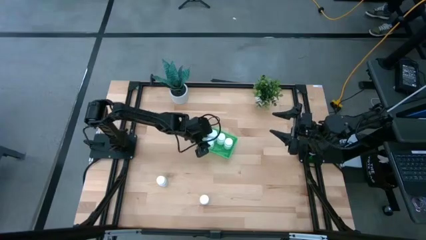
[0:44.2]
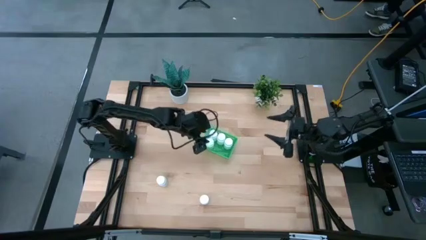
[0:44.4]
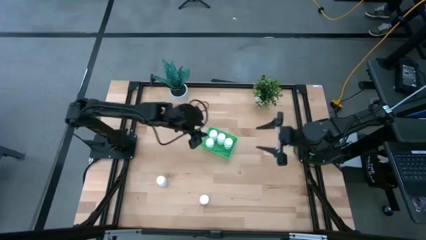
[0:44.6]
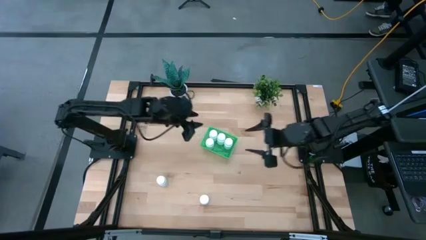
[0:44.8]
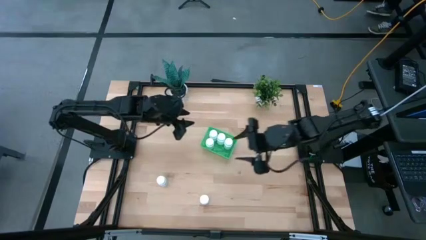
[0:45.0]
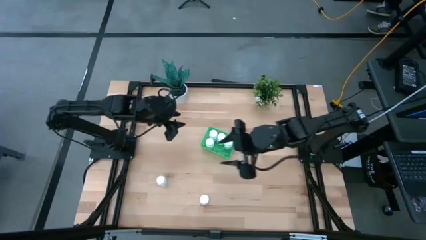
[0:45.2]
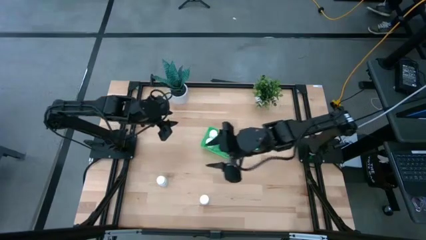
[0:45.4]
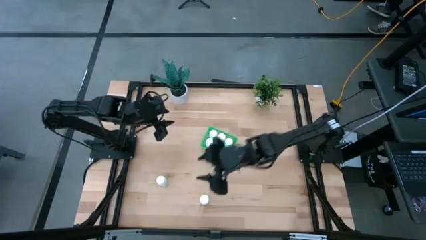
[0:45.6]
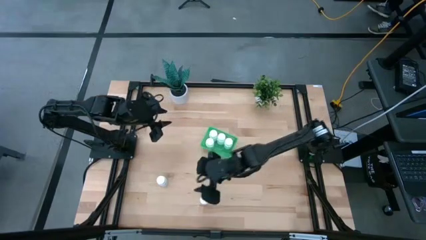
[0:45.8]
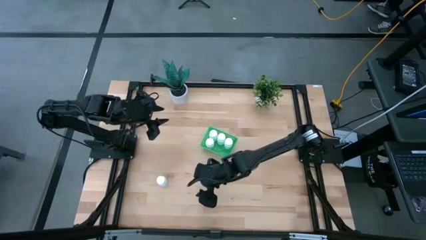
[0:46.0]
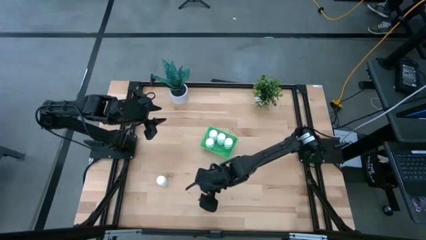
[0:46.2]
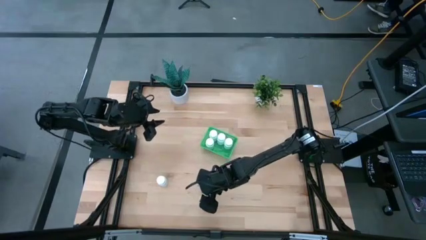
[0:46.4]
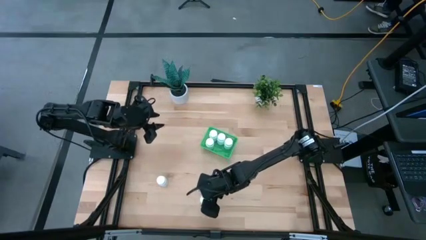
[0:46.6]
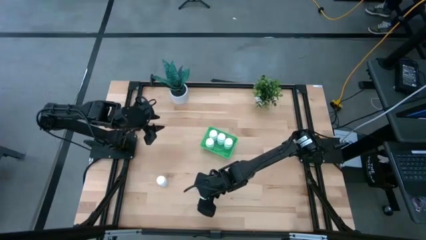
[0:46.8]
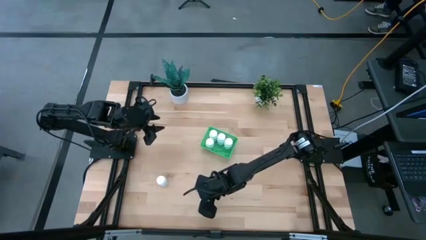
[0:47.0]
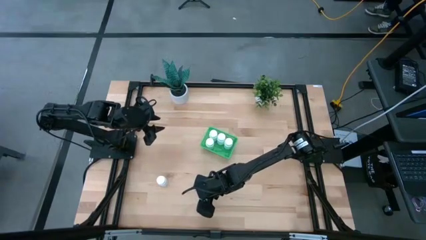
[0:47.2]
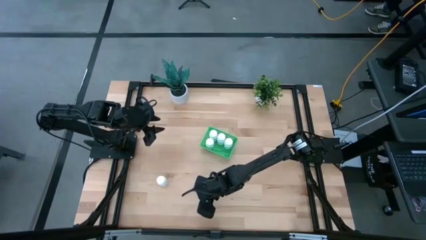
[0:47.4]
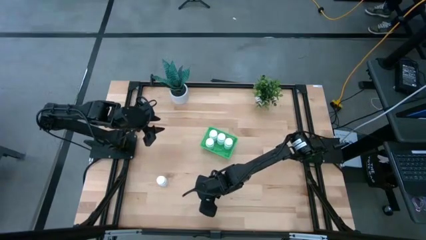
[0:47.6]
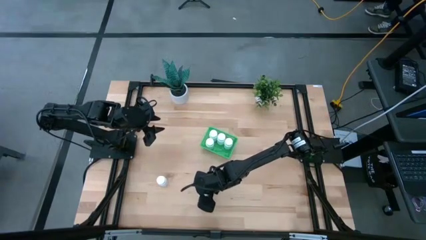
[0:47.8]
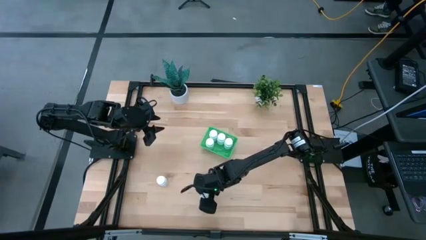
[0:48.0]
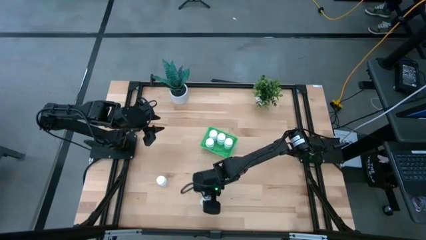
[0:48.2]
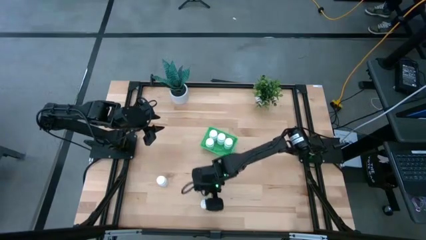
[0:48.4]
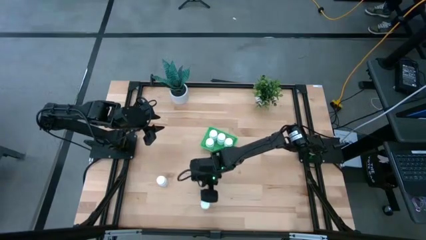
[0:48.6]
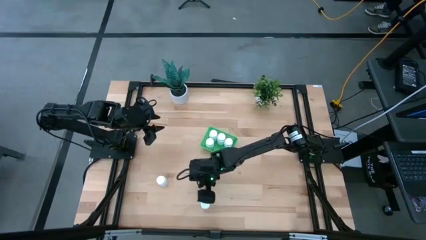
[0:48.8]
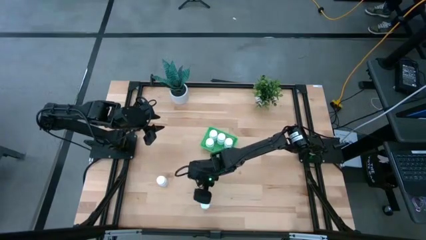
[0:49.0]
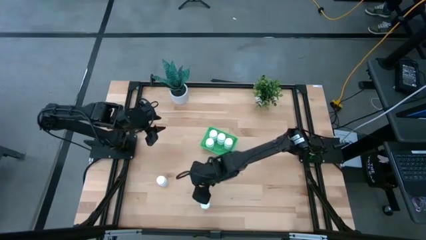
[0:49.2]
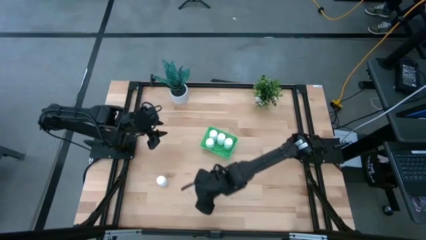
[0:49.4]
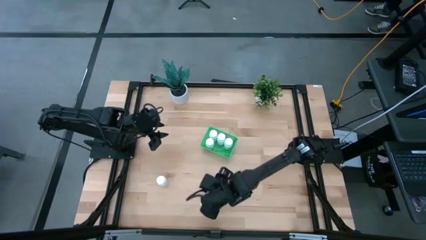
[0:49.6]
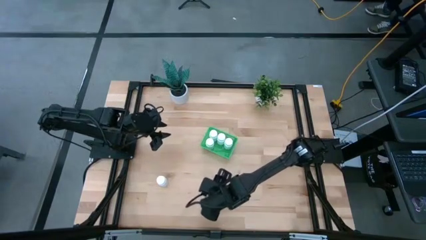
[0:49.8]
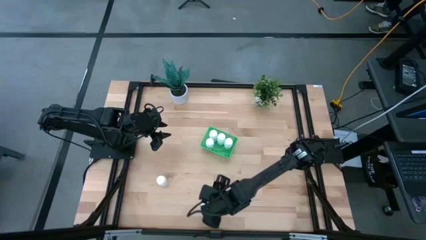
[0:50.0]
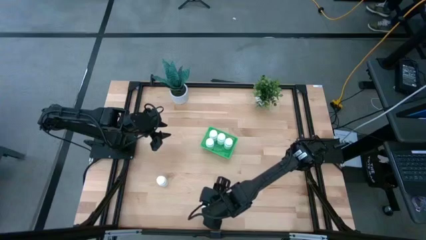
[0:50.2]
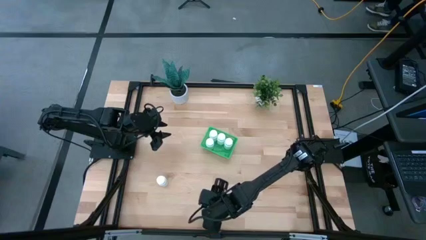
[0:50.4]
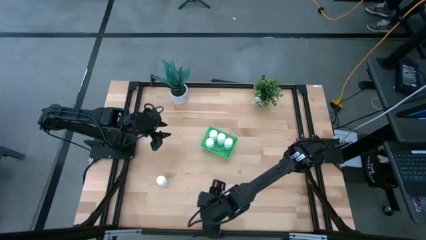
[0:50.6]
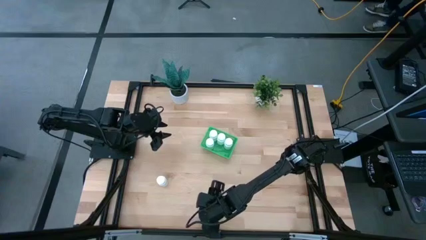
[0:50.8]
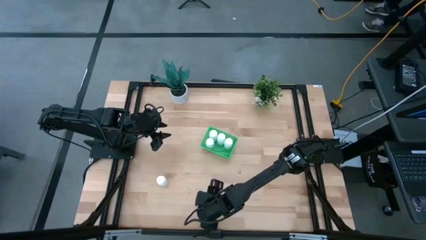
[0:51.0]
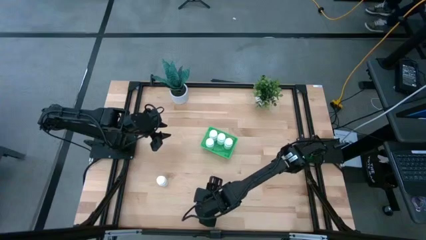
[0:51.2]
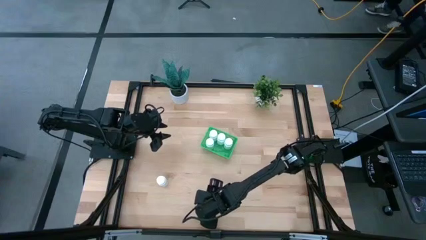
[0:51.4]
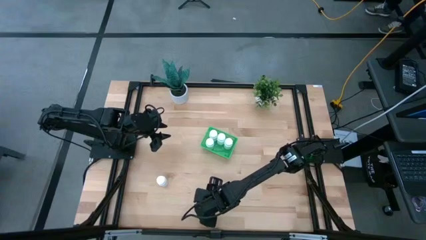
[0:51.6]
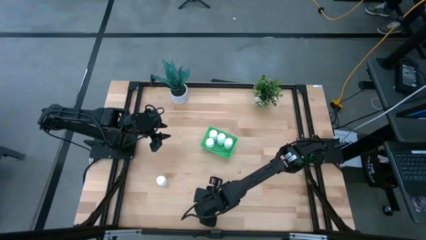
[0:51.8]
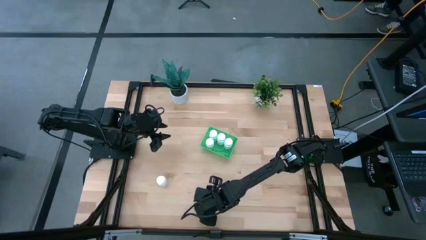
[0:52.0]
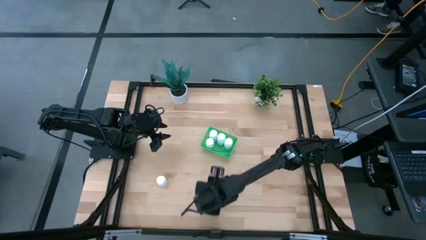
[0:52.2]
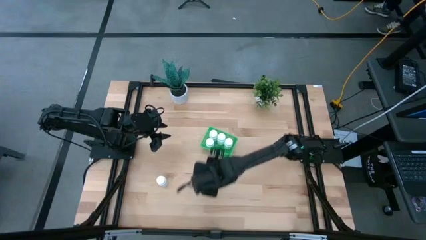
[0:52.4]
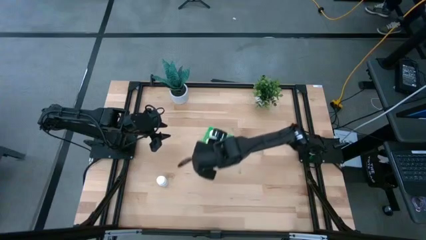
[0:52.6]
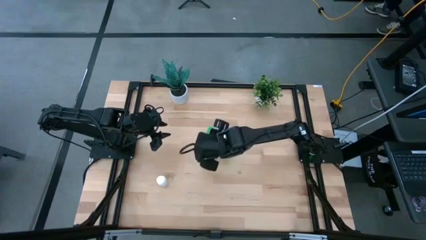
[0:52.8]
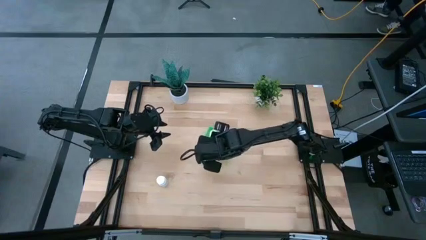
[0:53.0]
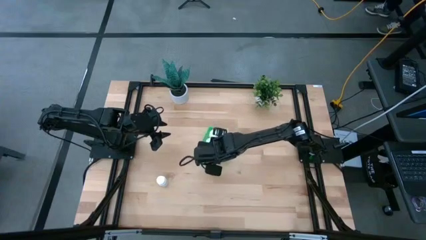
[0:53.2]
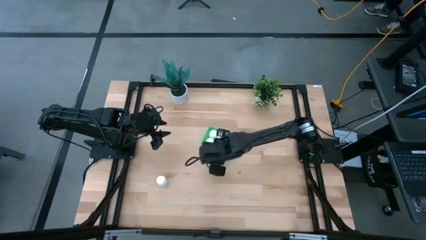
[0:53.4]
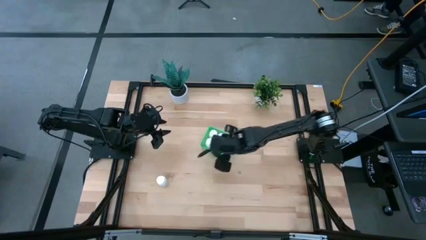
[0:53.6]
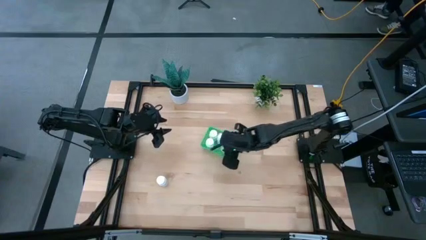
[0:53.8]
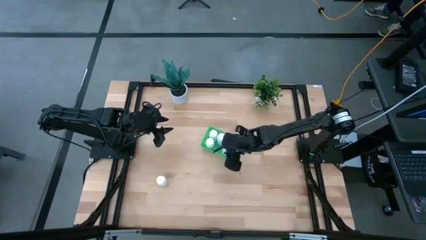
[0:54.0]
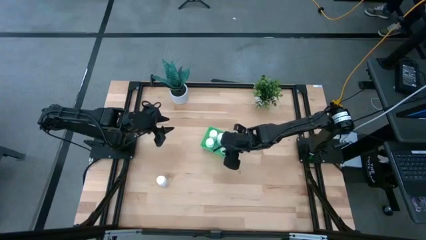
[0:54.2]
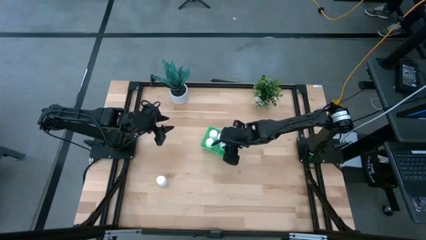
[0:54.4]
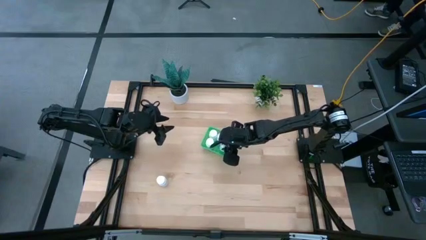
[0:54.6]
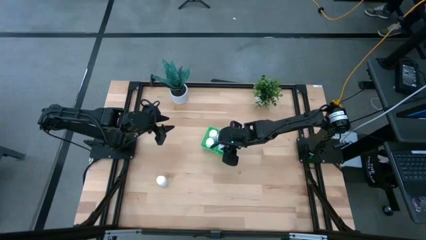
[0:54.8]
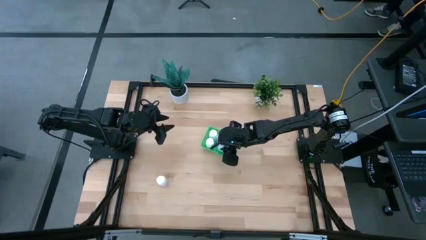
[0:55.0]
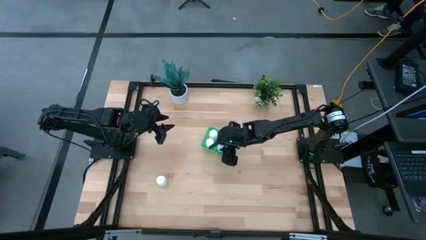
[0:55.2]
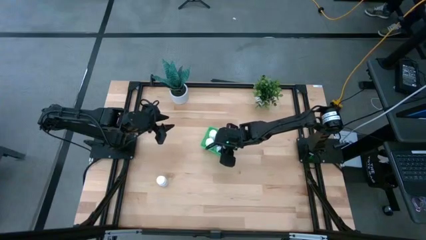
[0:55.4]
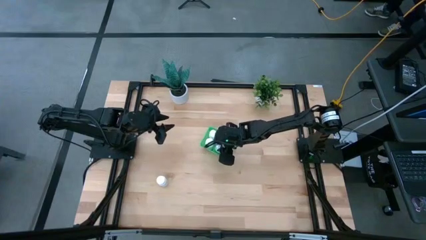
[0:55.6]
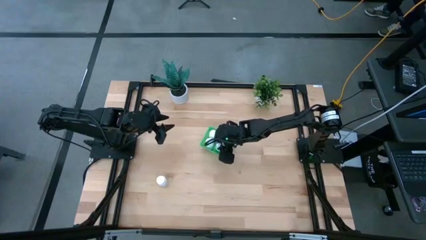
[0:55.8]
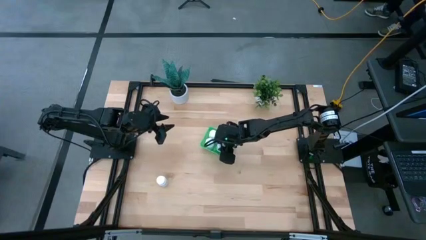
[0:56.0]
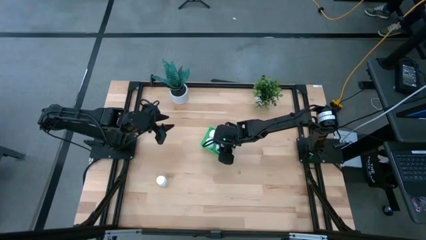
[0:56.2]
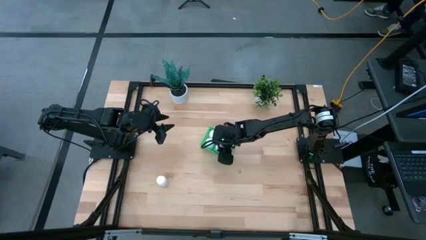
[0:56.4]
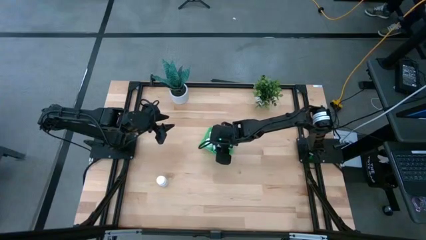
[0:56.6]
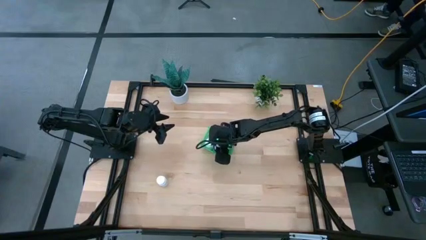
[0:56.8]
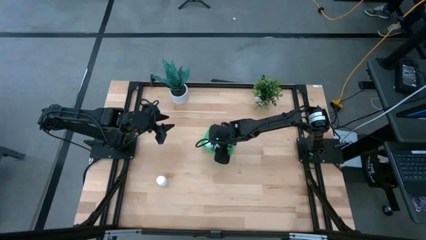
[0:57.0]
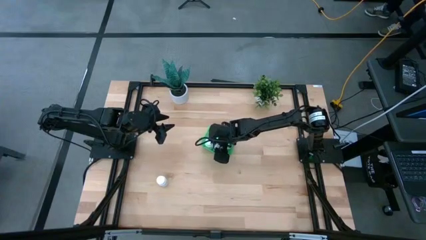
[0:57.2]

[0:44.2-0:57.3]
Task: Pick and place pill bottles into a basket
Put the bottom right medicine bottle into the green basket

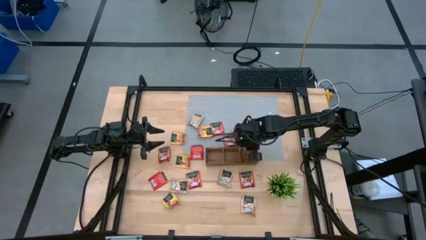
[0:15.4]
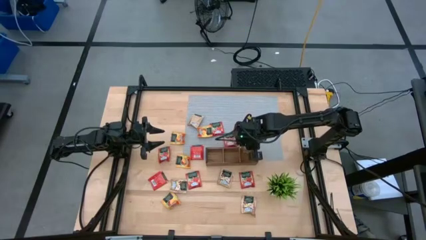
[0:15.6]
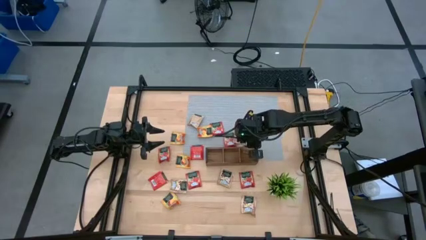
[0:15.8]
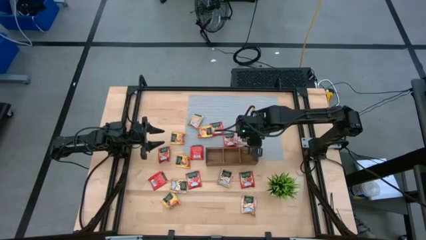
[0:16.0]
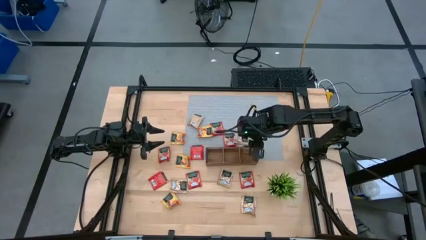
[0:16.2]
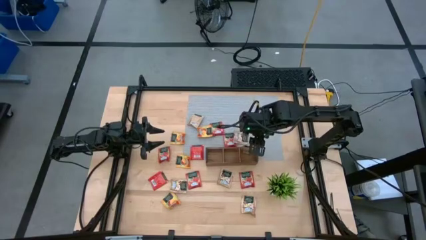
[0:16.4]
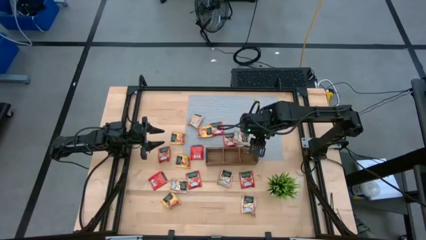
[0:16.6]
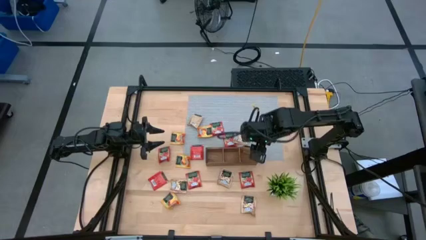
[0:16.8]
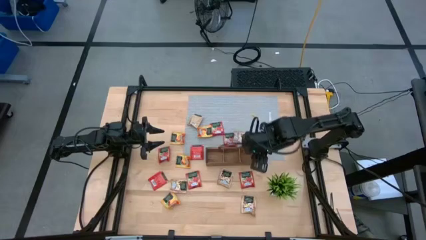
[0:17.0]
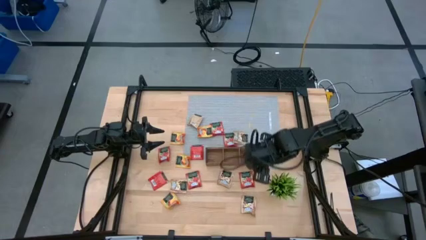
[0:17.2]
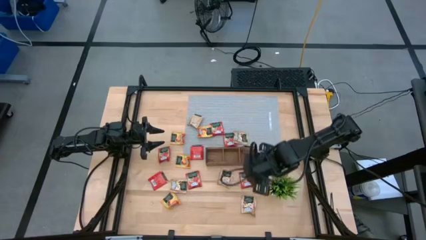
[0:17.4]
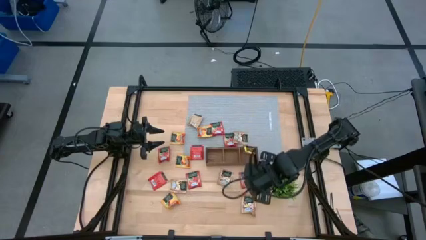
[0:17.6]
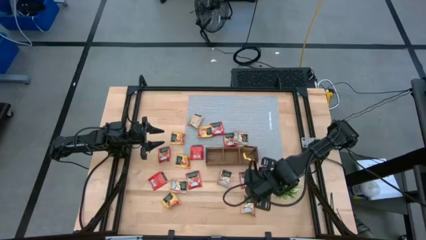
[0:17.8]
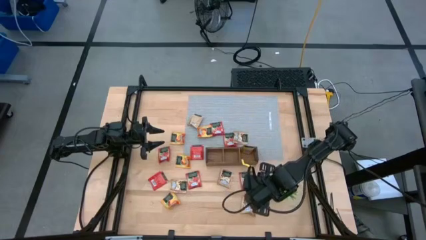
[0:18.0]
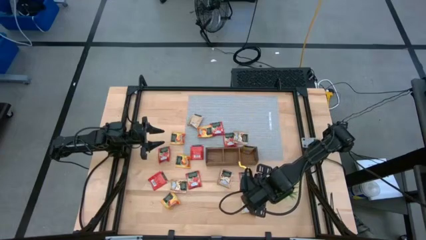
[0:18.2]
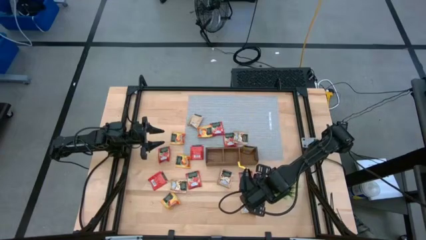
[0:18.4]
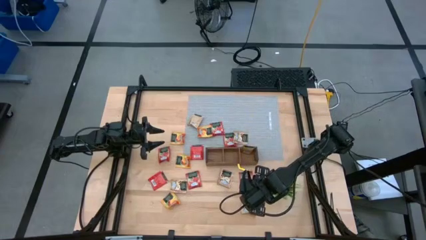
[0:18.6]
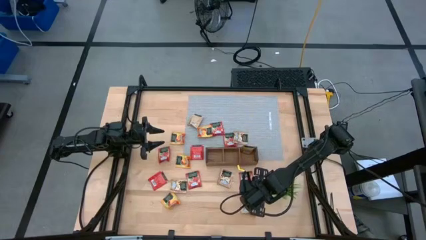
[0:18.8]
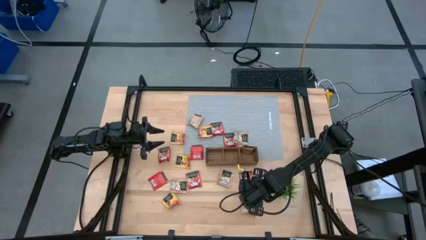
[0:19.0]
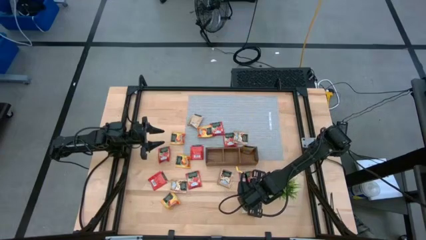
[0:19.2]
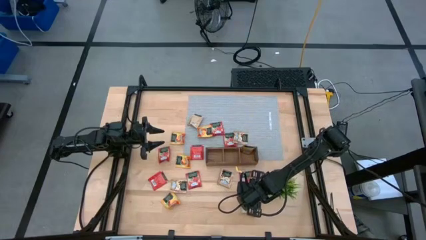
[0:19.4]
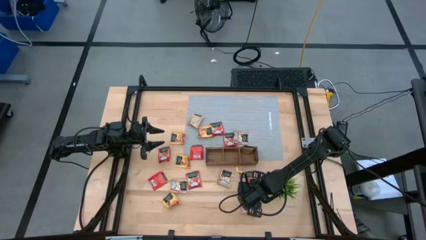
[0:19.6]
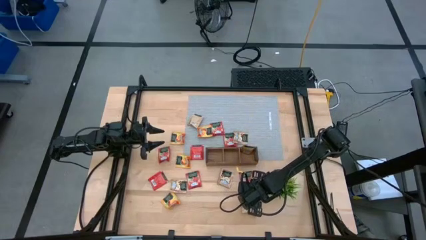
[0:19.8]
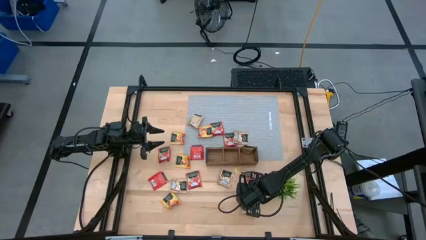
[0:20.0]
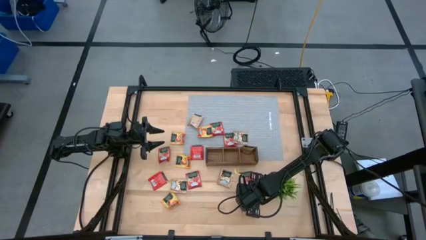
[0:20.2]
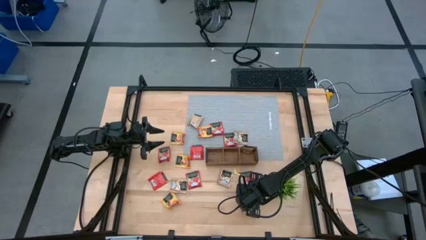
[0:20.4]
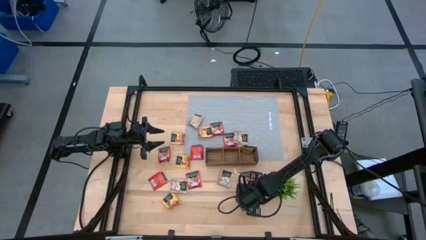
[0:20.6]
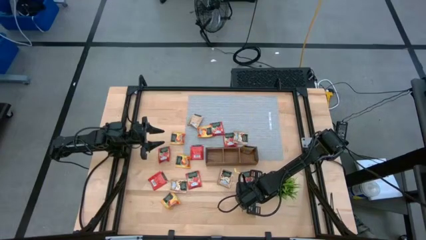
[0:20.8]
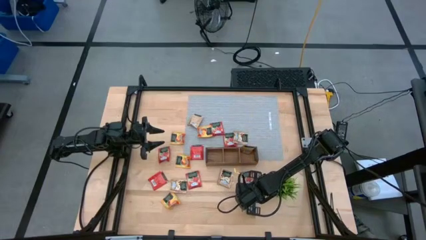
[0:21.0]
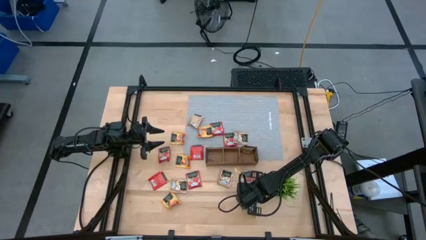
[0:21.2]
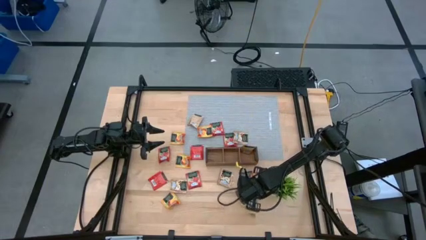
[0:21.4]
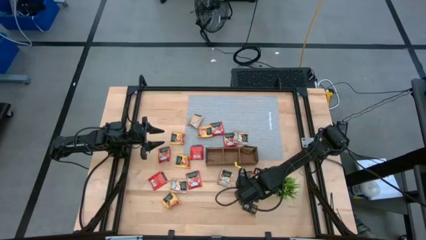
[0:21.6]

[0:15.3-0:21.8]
Task: Pick & Place Tea
Put the brown tea bag into the right section of the wooden organizer
